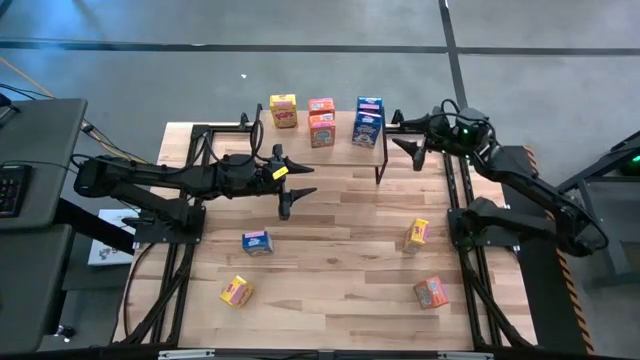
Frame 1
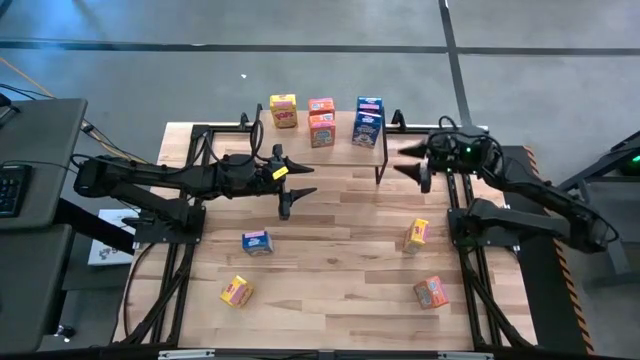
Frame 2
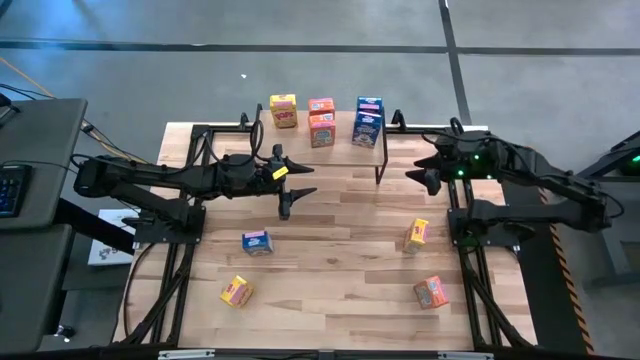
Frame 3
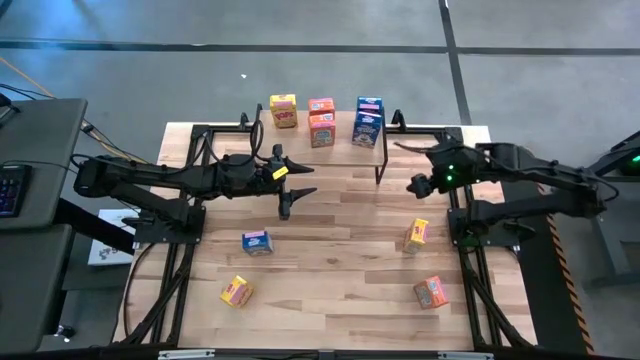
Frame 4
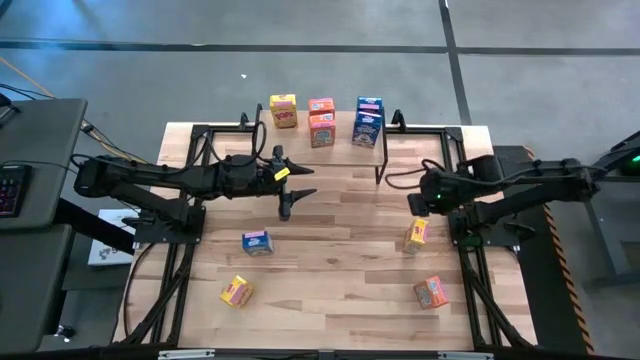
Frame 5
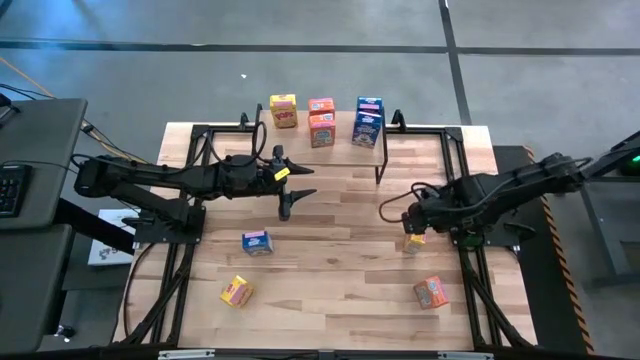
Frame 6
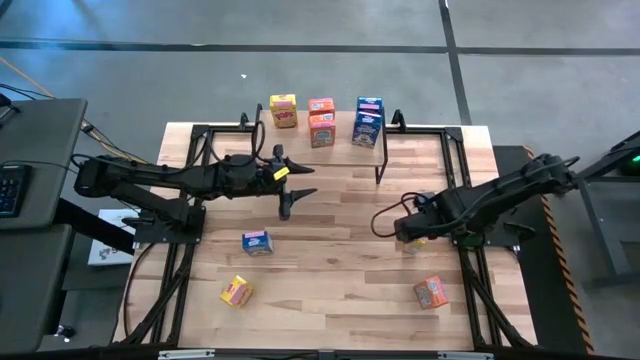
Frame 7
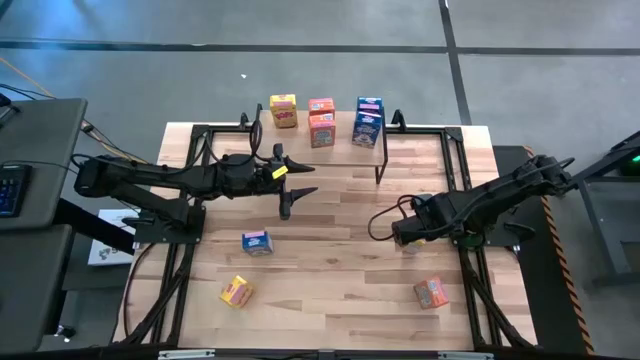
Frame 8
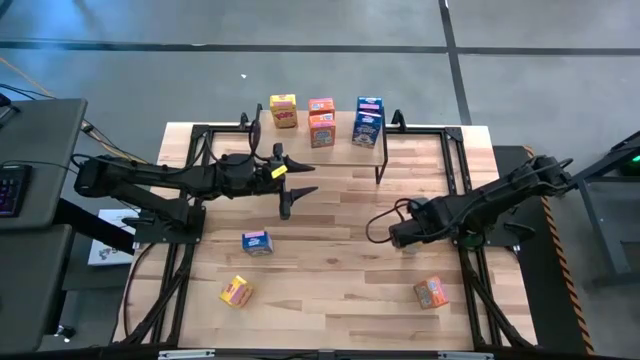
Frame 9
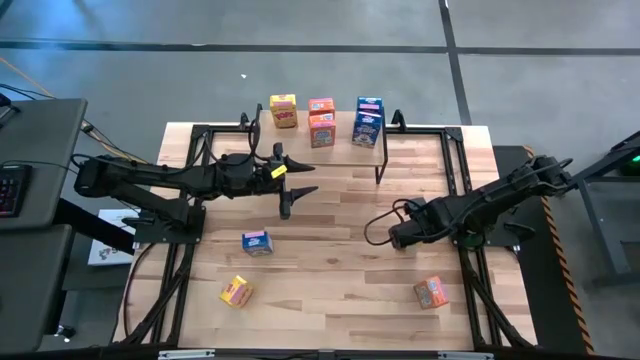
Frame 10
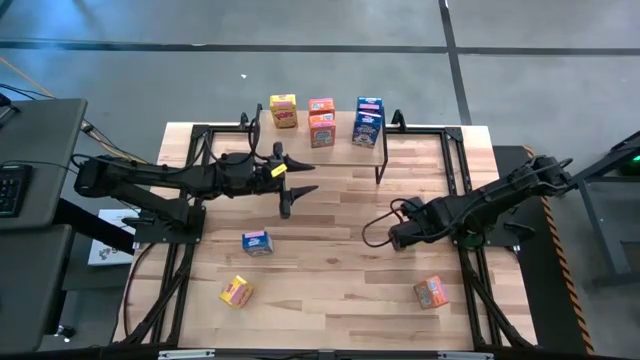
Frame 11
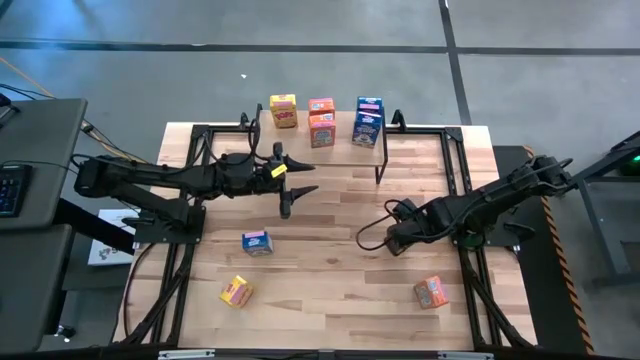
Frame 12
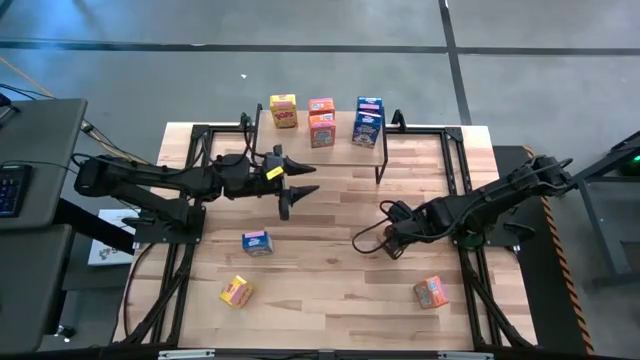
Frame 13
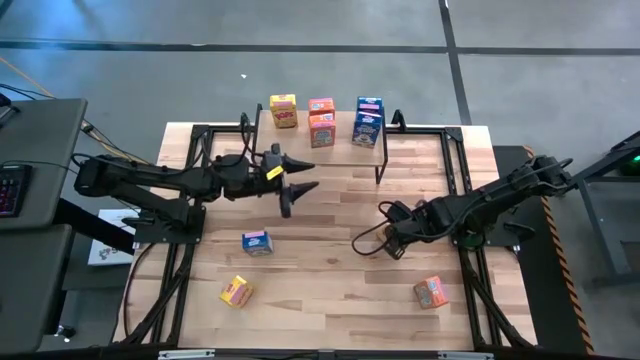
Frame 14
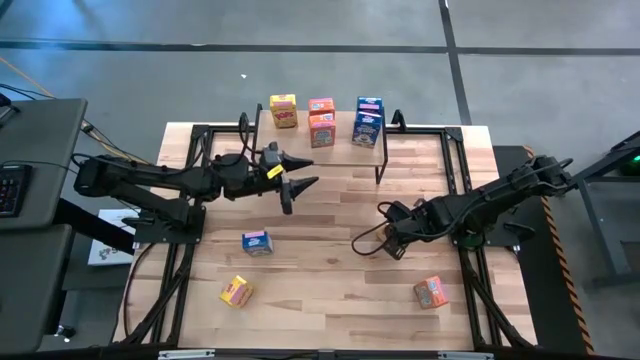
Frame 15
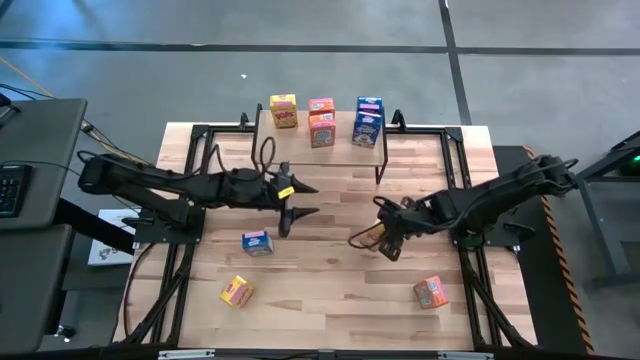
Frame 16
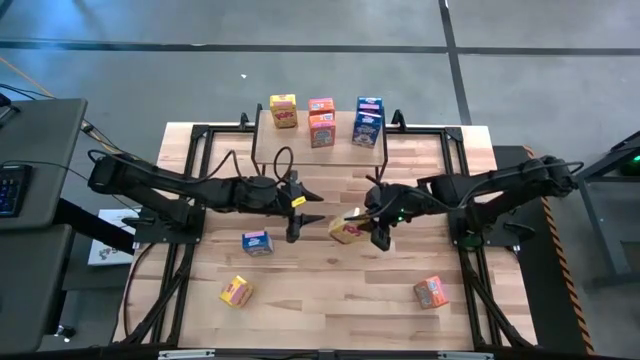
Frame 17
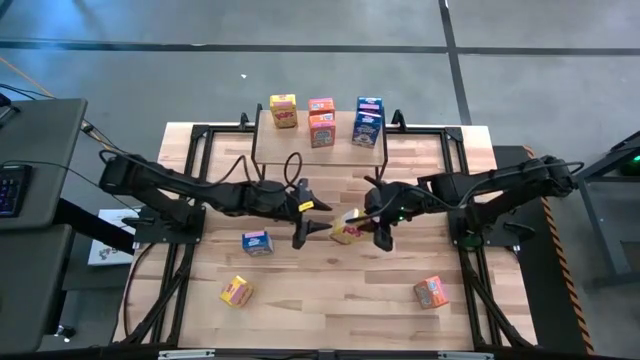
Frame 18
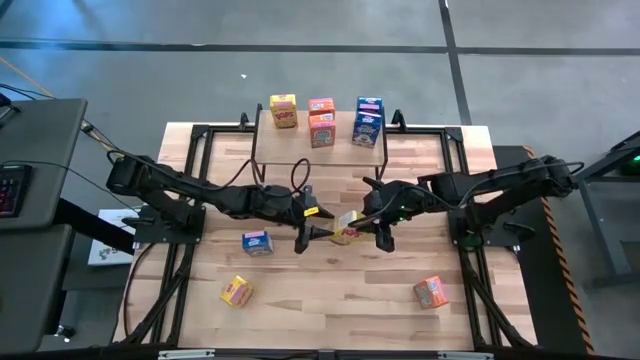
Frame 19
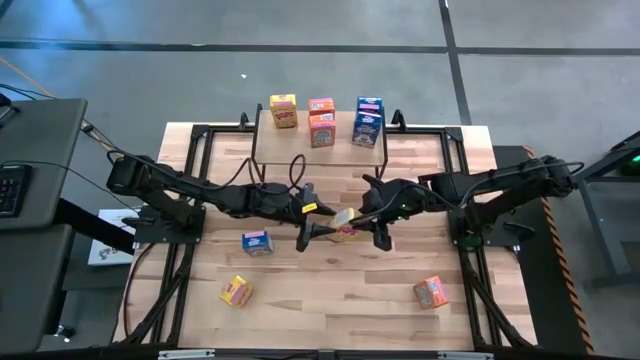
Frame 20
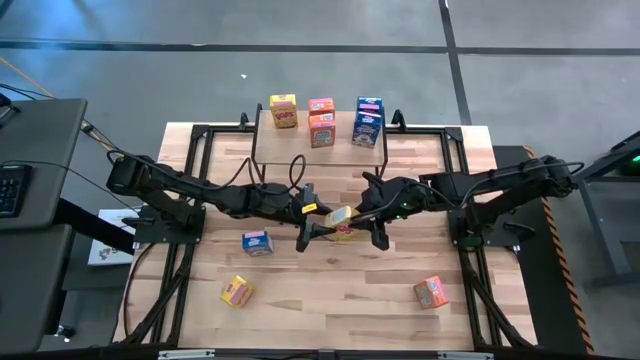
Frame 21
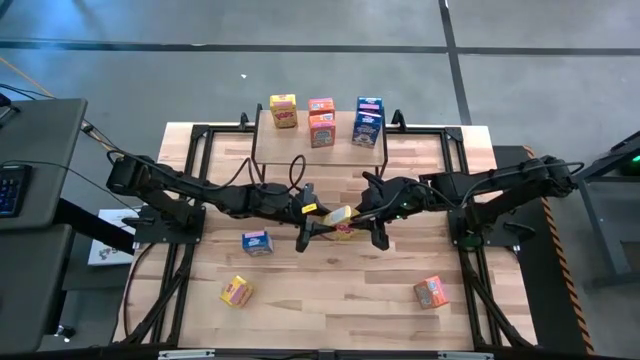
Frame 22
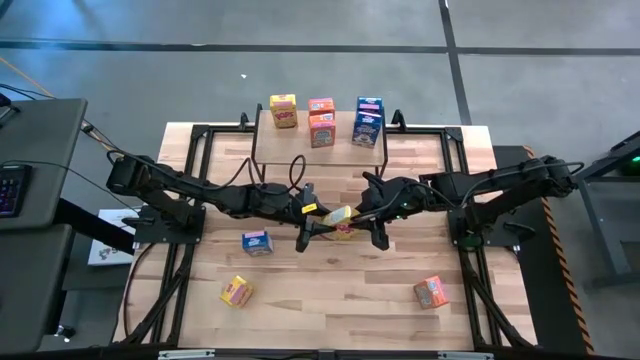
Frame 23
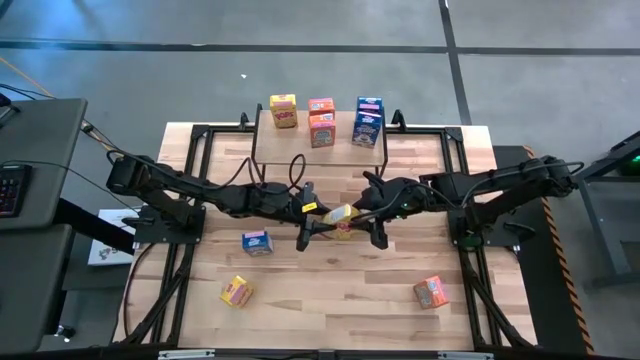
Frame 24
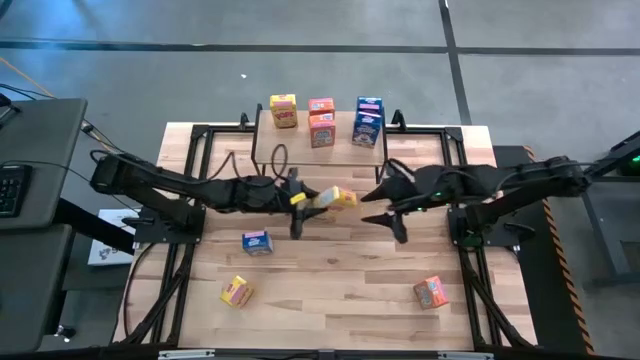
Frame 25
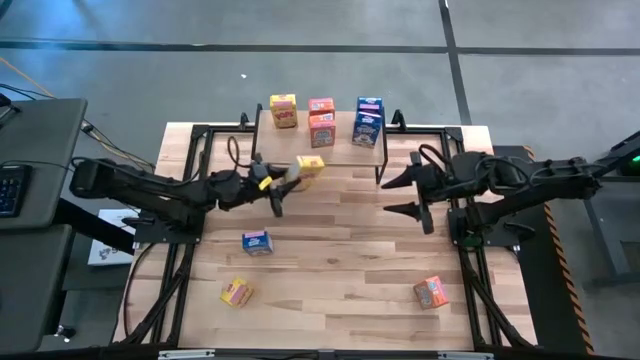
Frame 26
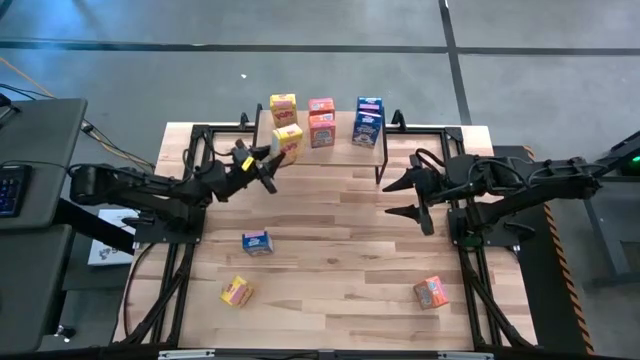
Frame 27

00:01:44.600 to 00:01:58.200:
Task: Stack cereal on shelf
Put the right yellow cereal box on the shelf aligned with the other yellow cereal box
